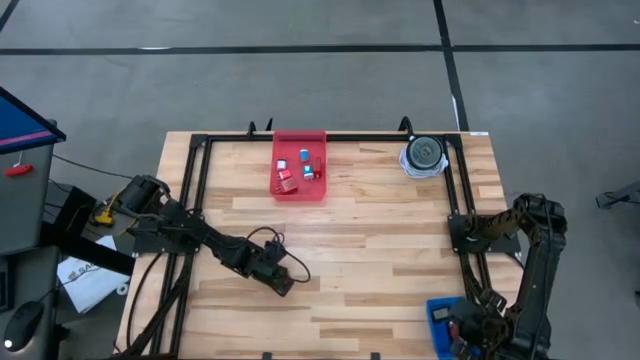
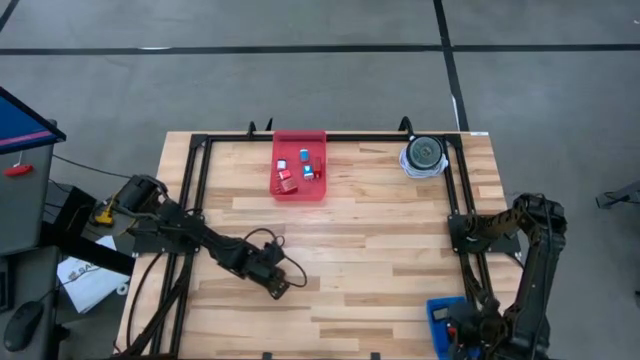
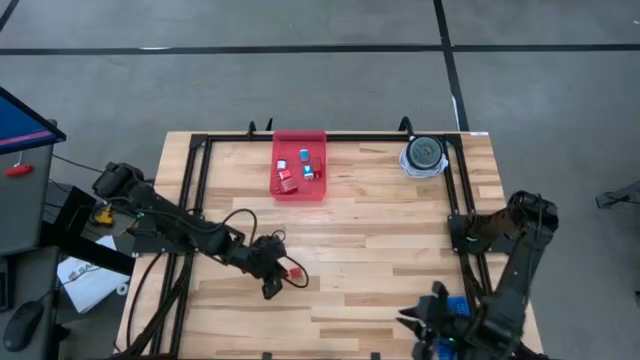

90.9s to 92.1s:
Task: Pick & Place Office items
Put the red digital timer into the blue bin

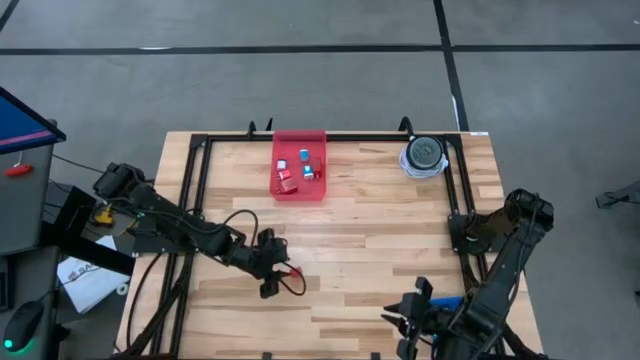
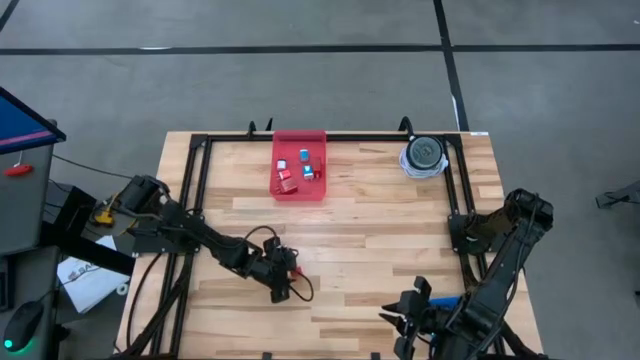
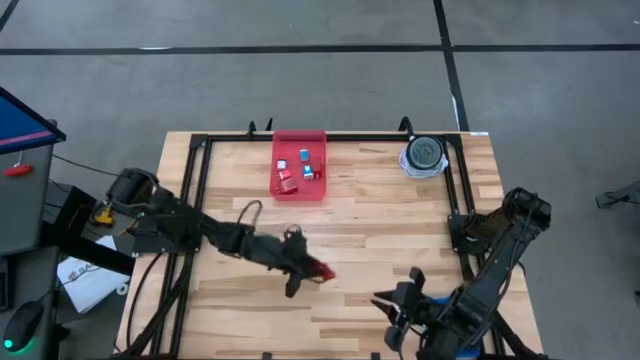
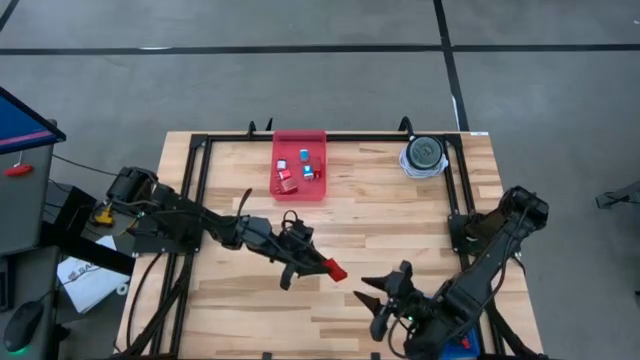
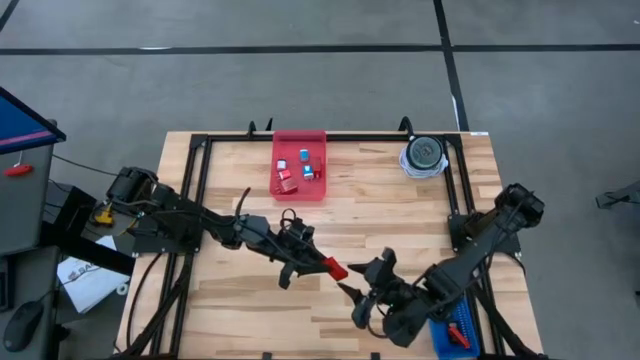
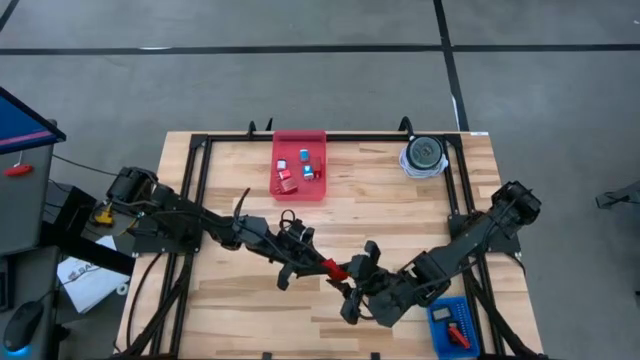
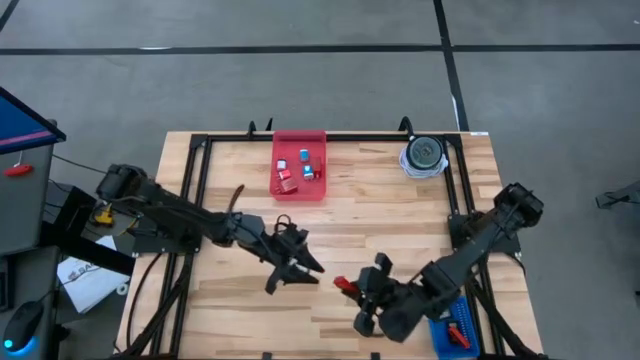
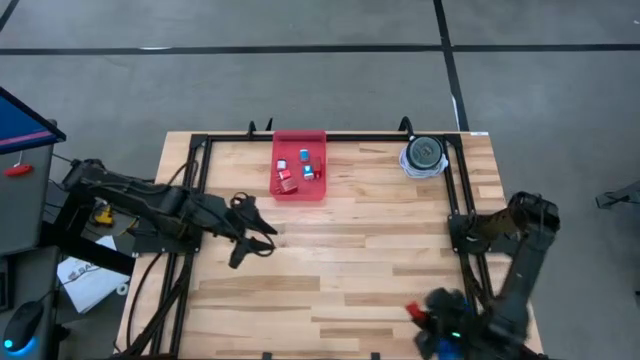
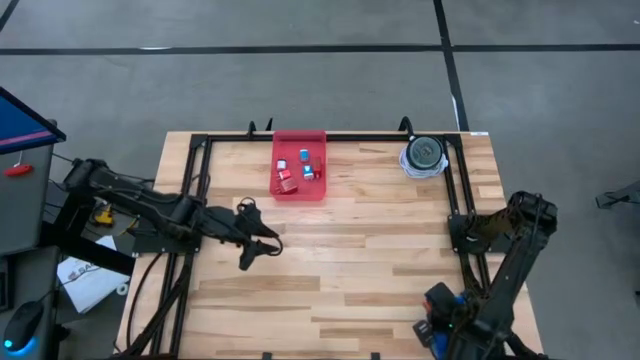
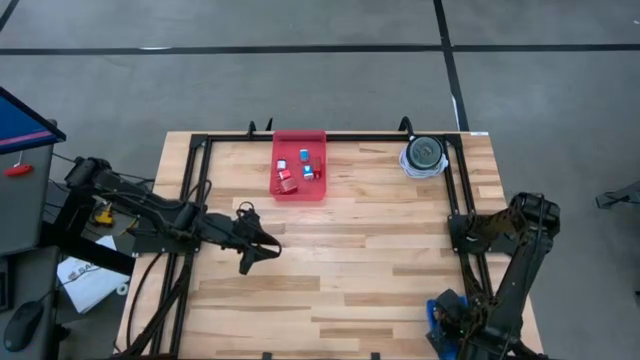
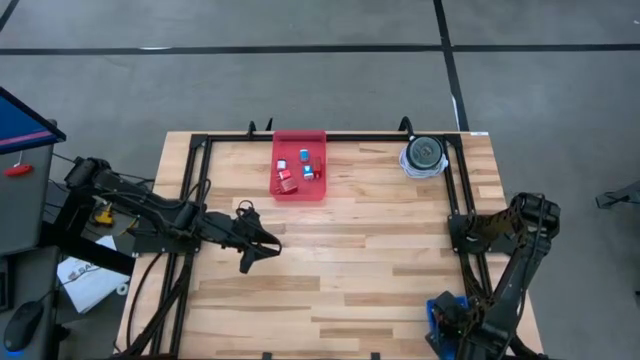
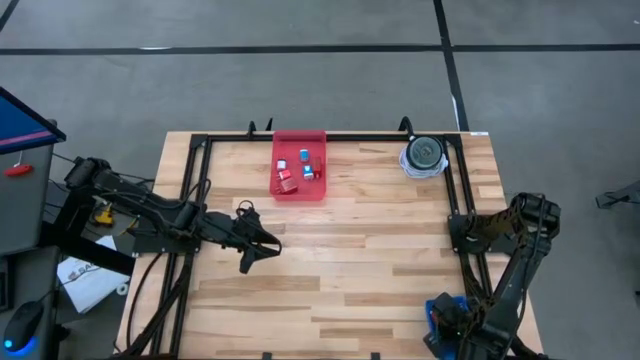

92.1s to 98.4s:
Put the red digital timer into the blue bin

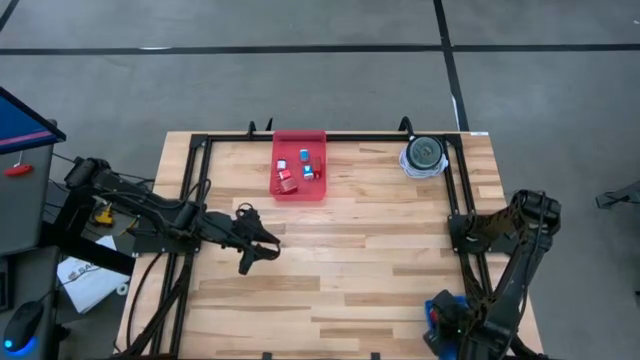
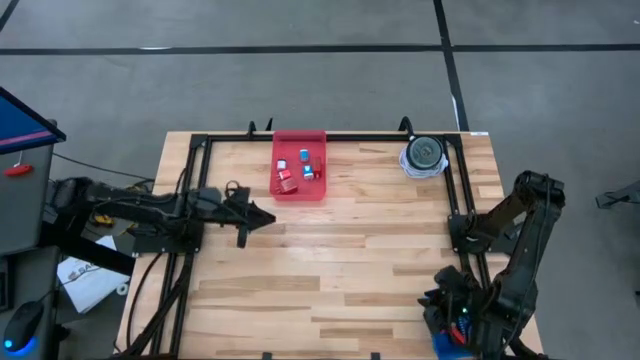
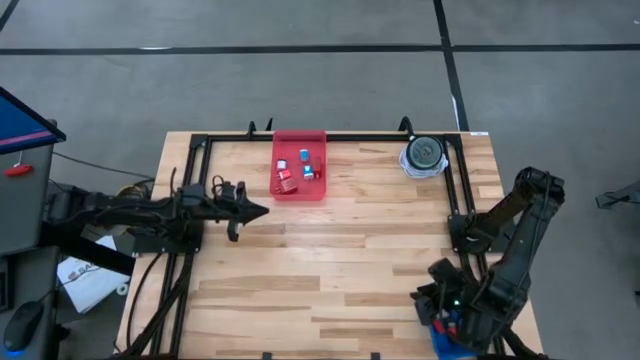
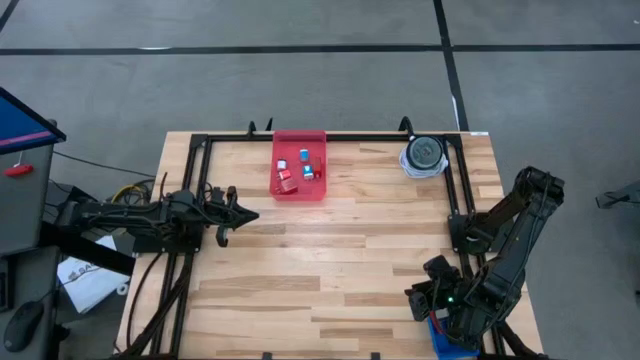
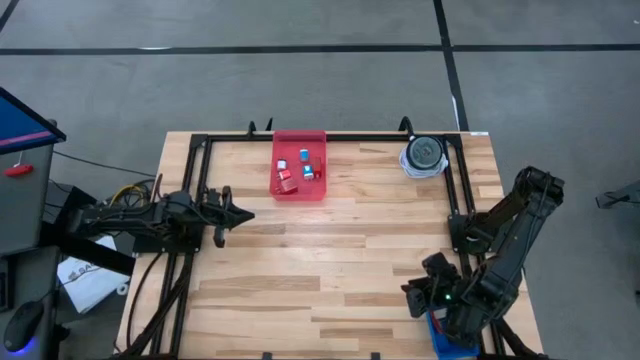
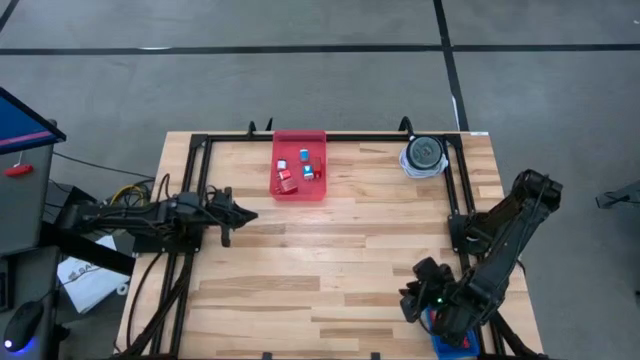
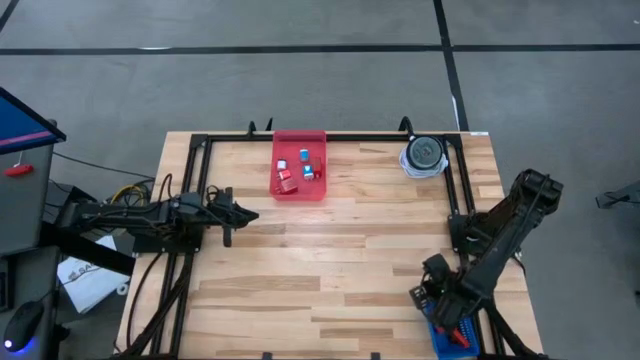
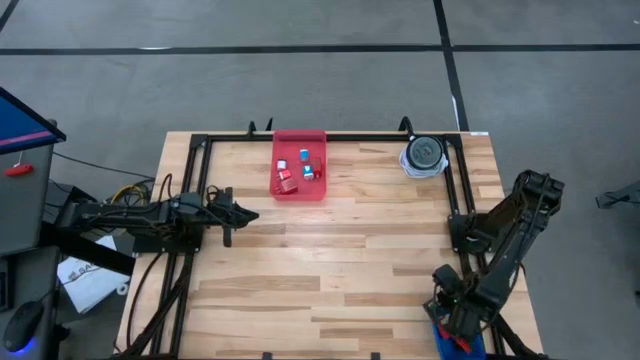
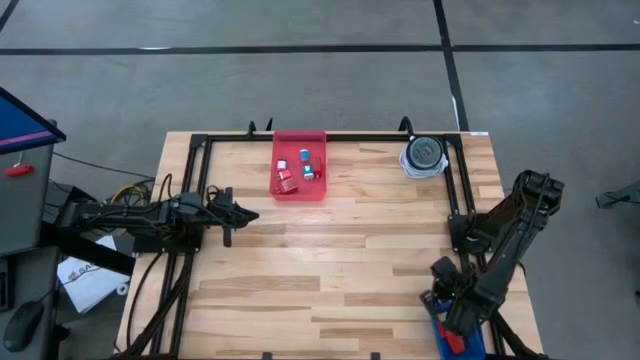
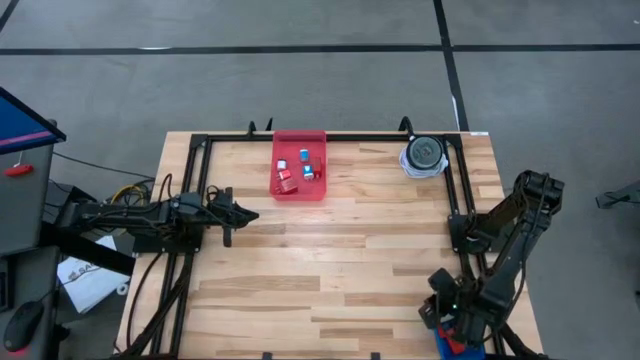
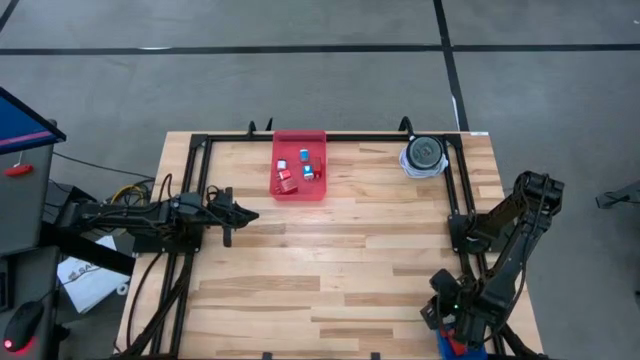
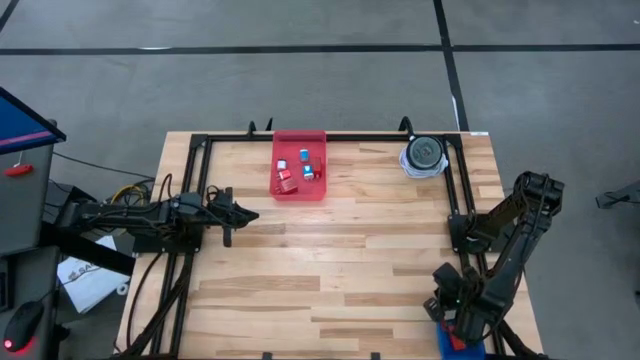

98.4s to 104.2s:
Adjust the blue bin

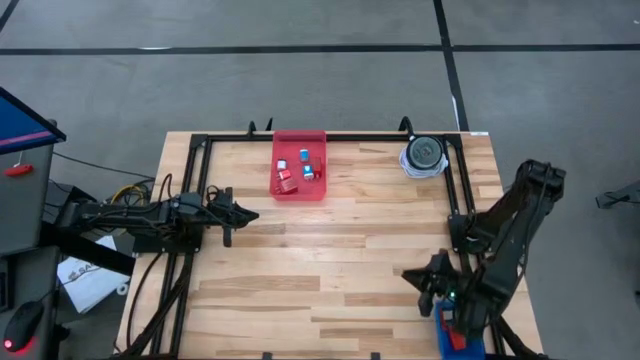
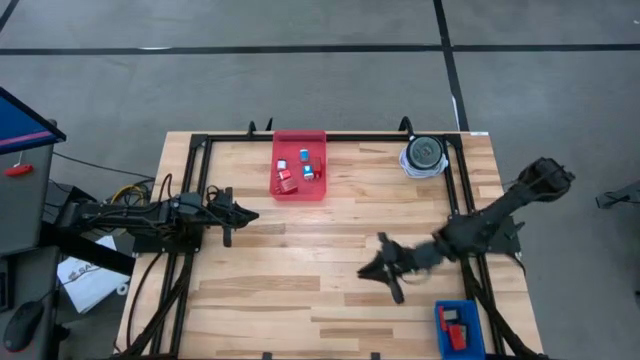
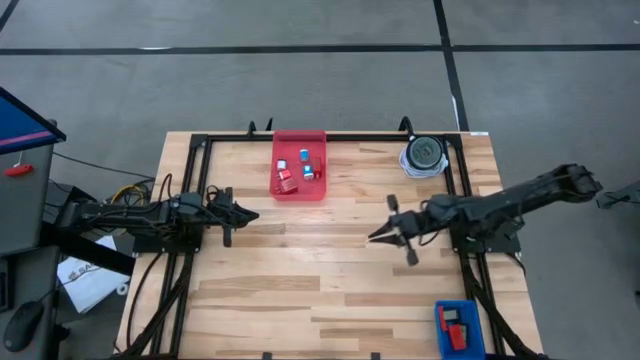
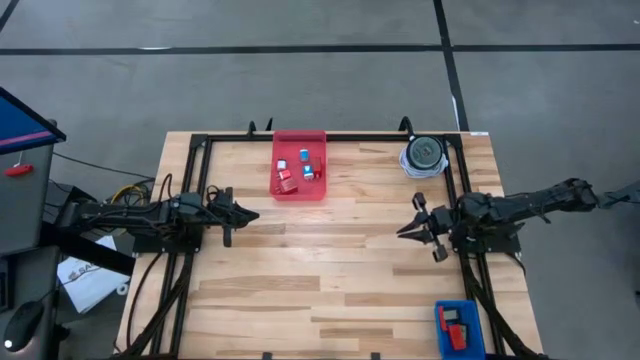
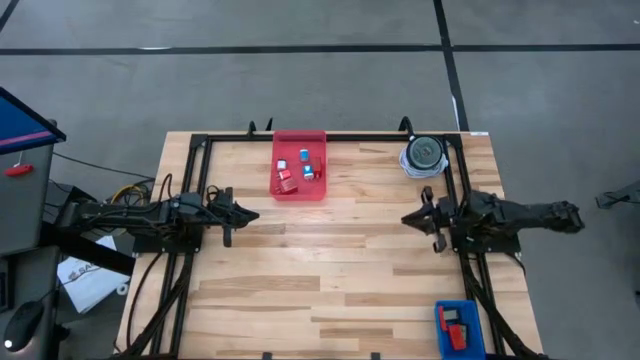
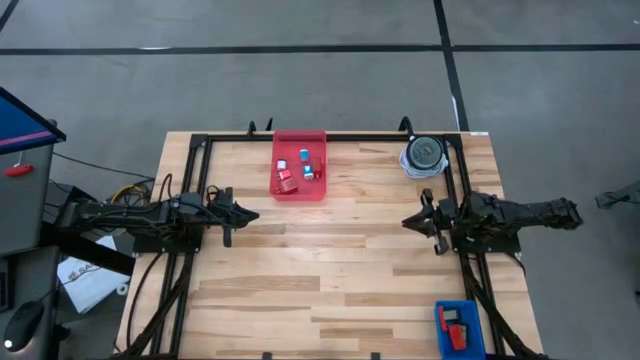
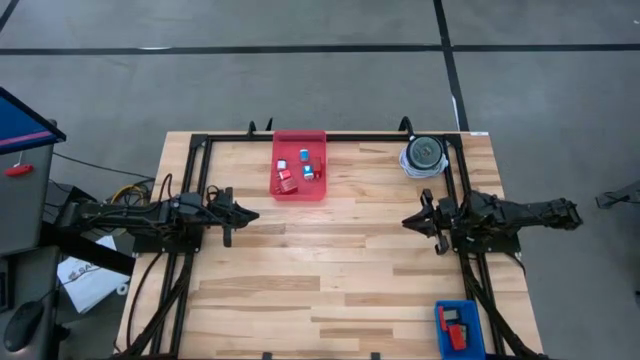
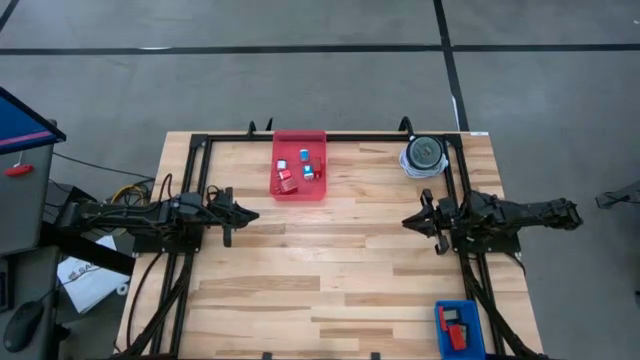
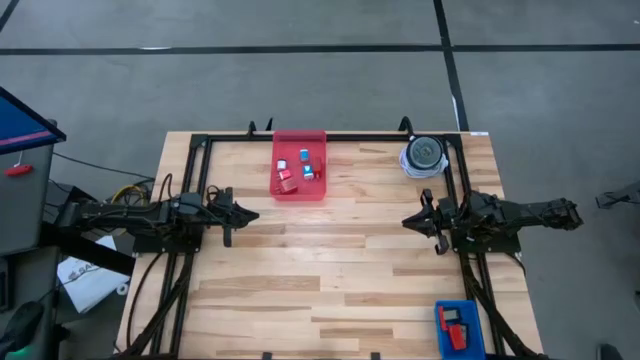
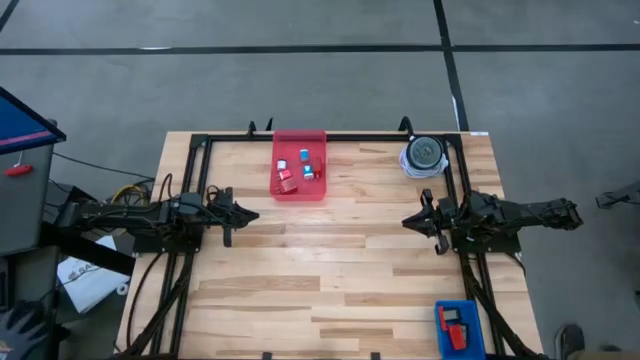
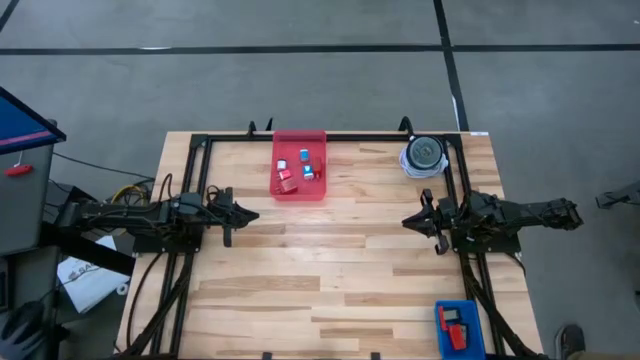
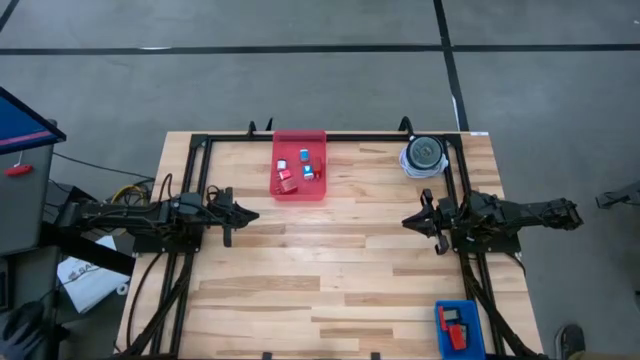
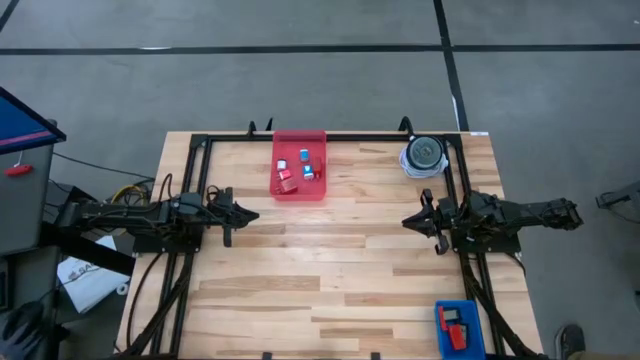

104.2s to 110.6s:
Return to Home Position
